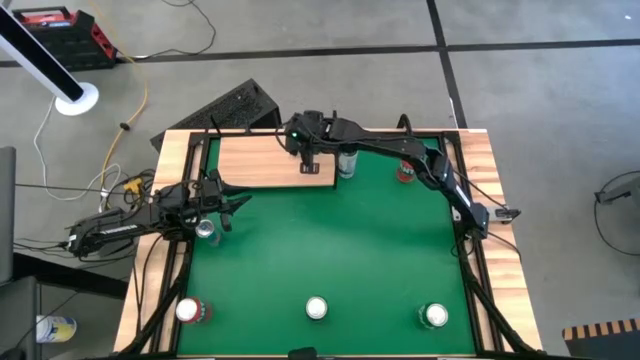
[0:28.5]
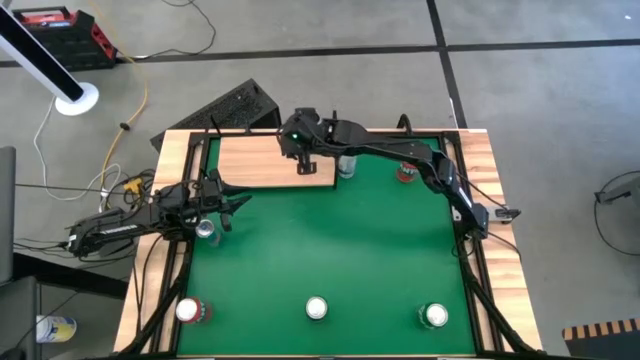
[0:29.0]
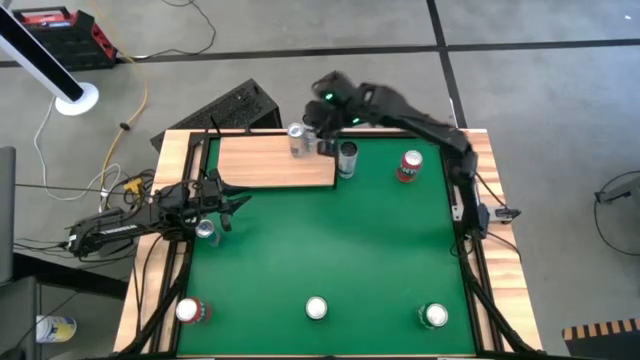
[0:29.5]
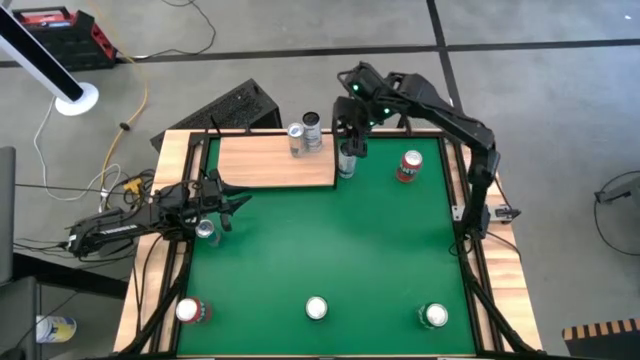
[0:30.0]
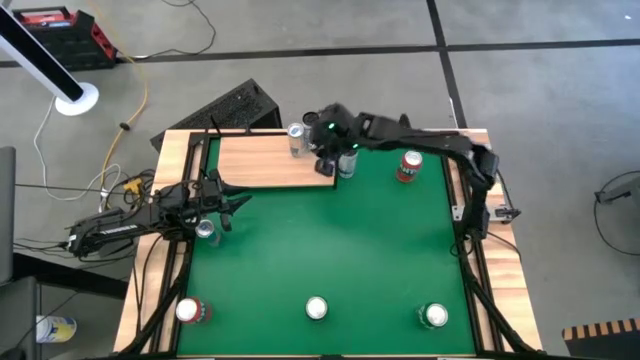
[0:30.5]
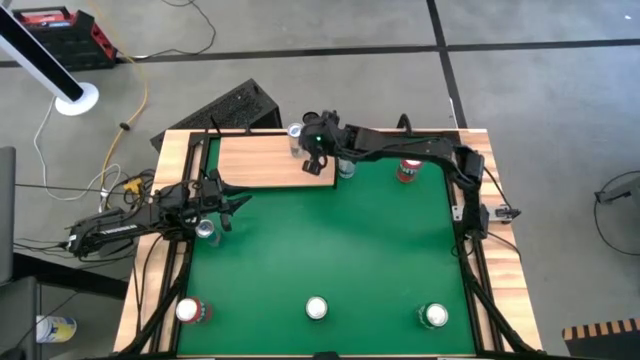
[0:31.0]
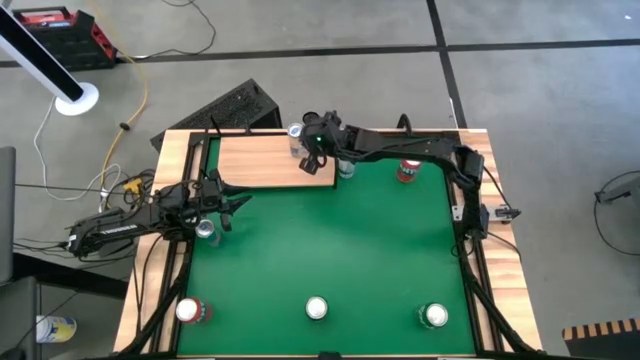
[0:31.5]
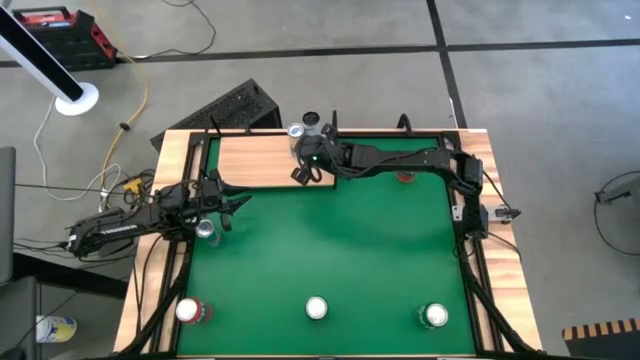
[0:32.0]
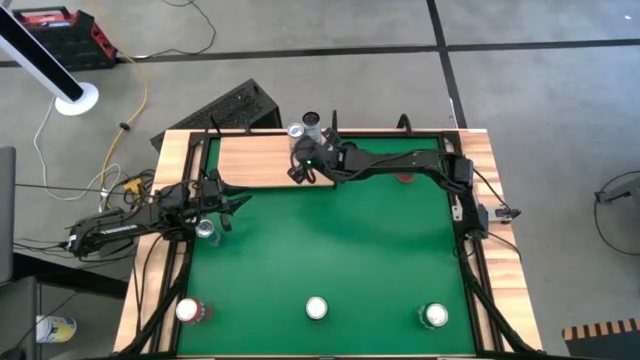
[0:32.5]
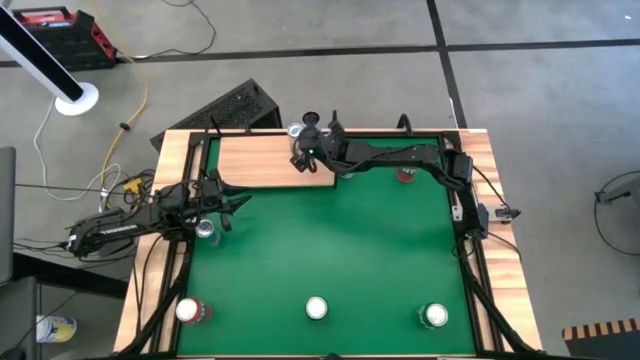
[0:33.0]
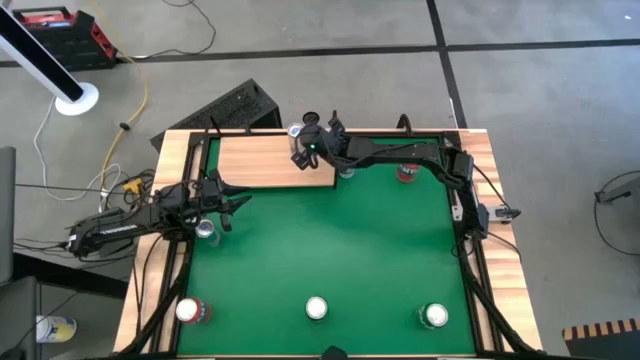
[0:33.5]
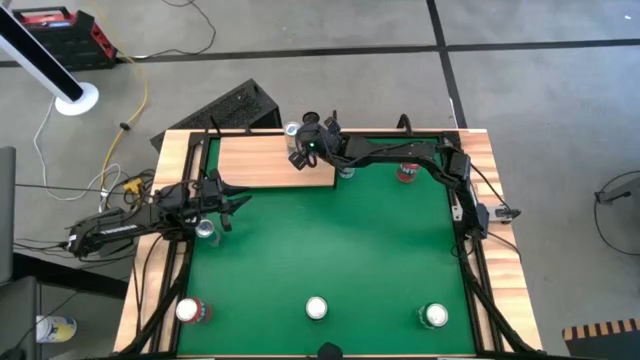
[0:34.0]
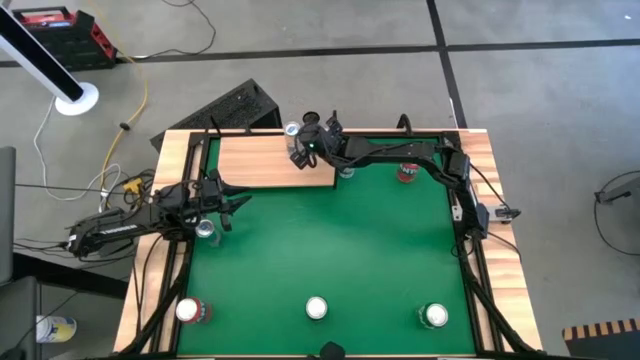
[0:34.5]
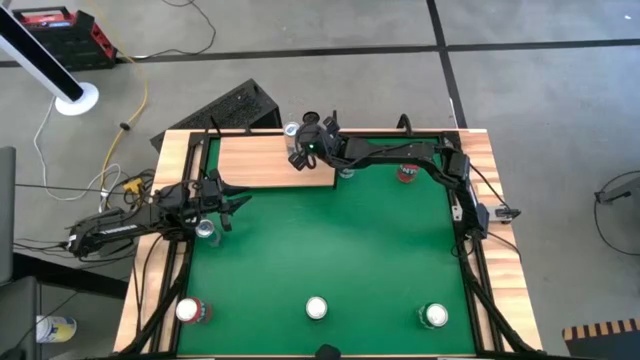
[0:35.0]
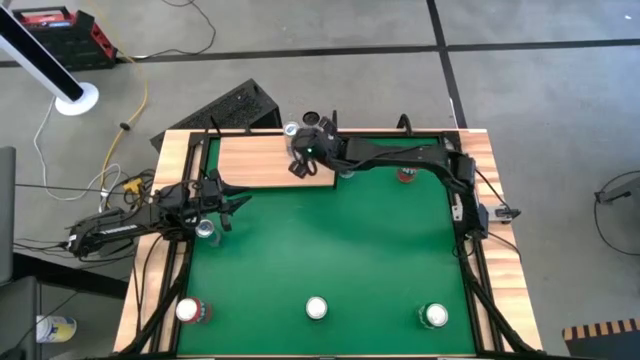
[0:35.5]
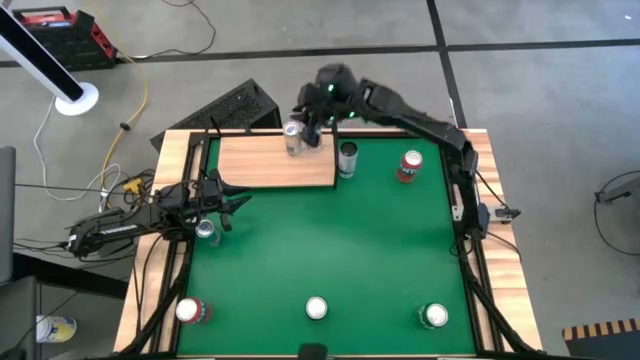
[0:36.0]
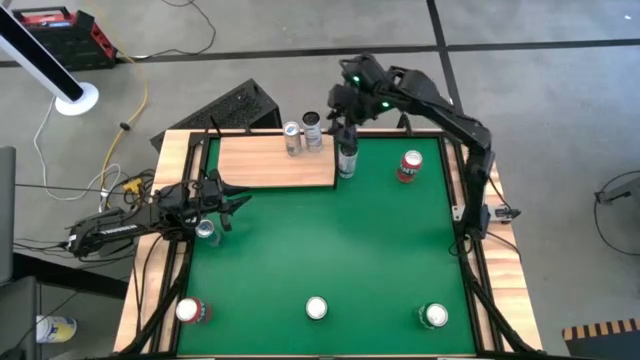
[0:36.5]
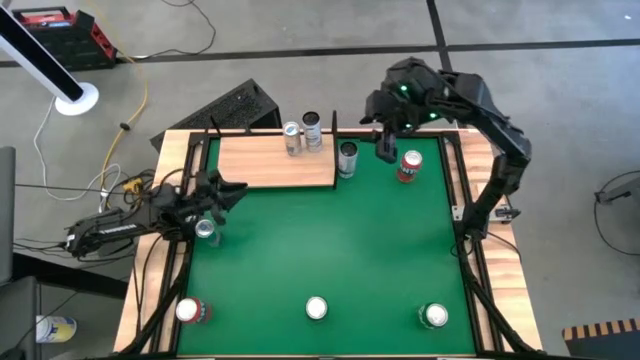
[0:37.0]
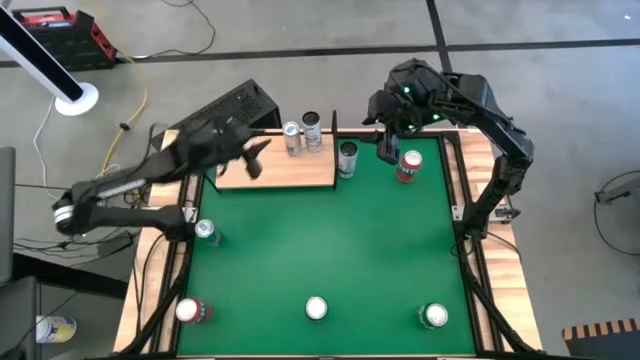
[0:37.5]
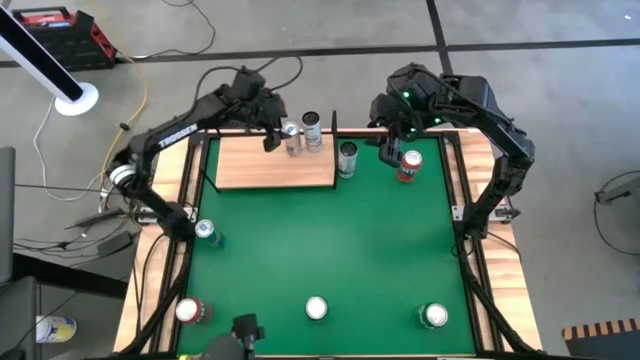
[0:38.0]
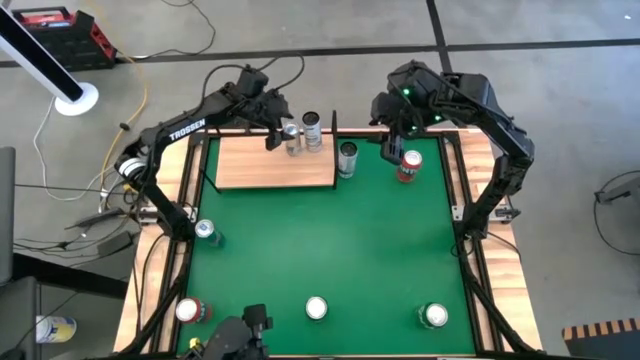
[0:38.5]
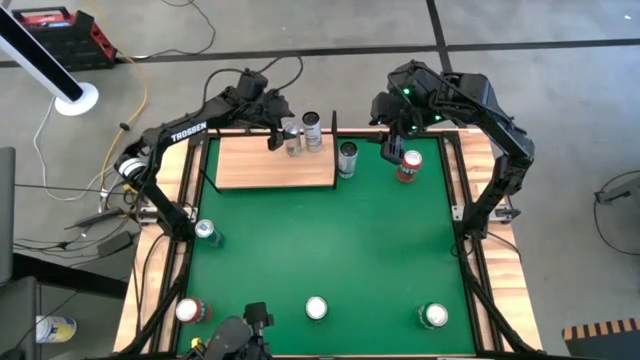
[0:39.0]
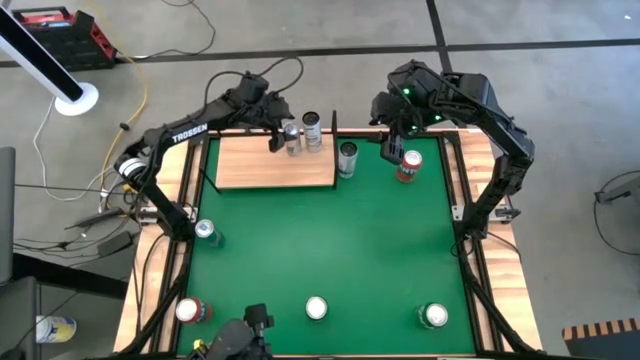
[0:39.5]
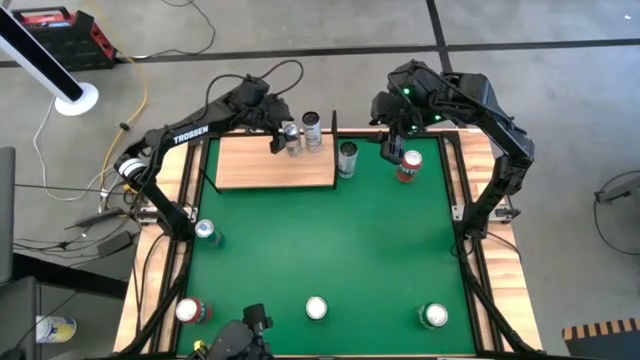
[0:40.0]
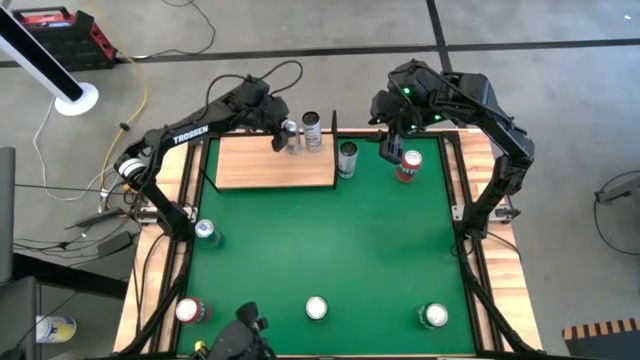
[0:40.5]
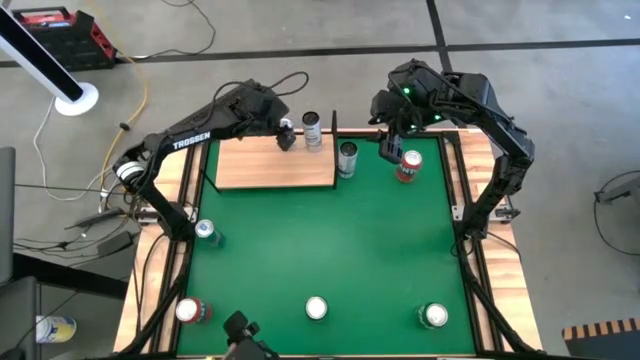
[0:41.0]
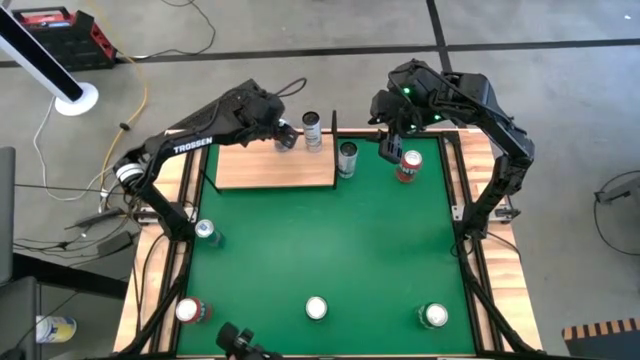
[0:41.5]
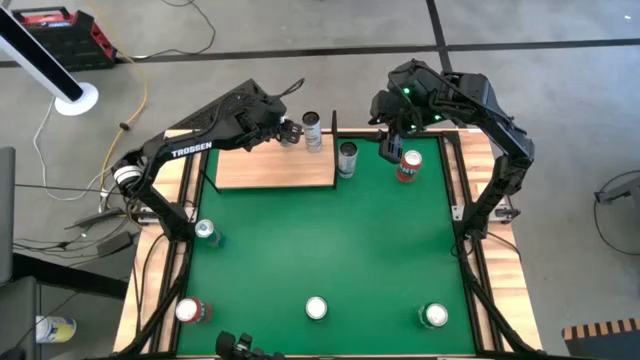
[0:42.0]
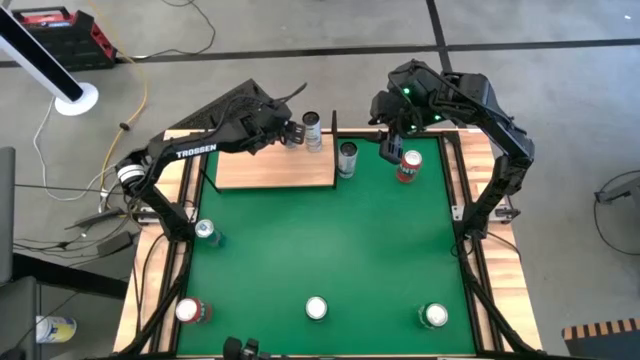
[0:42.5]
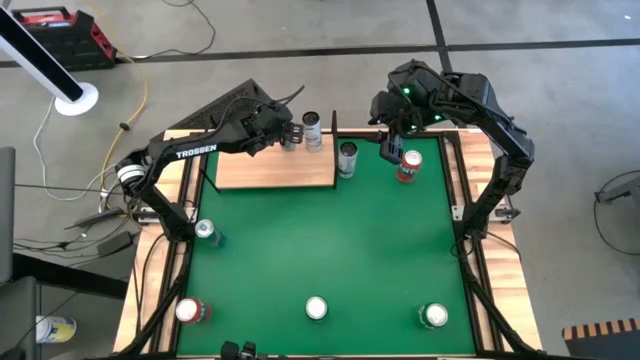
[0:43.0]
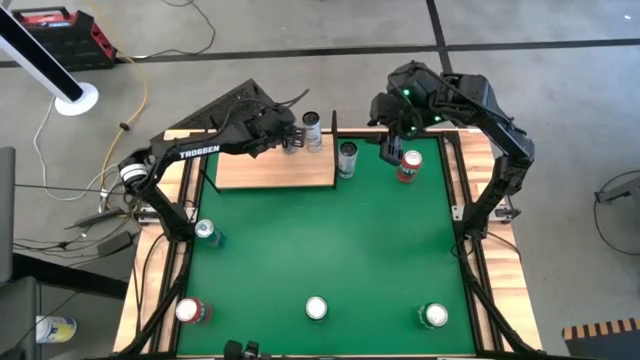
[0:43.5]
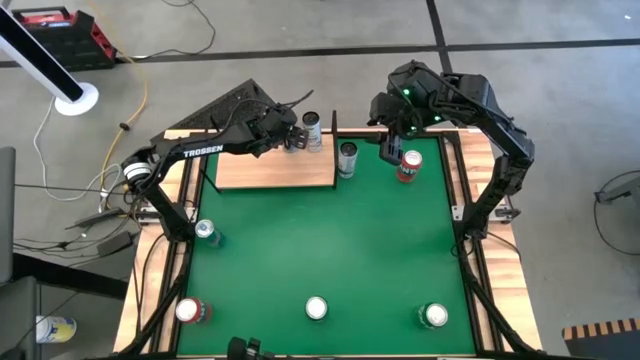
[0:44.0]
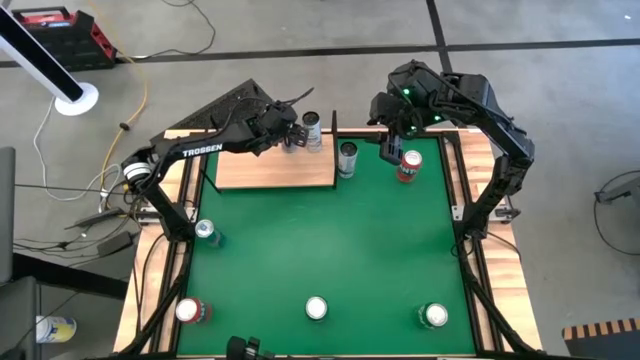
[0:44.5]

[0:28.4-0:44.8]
Task: Place canned beverage on shelf
Put the right blue soda can on the shelf
